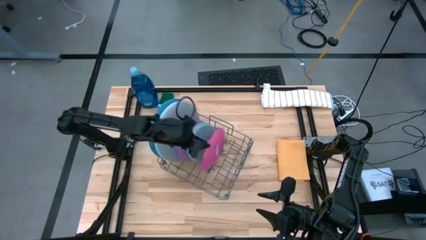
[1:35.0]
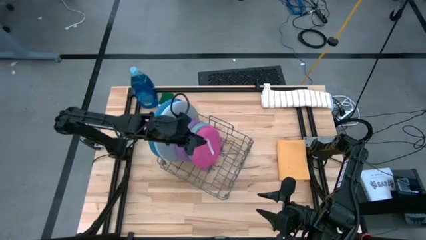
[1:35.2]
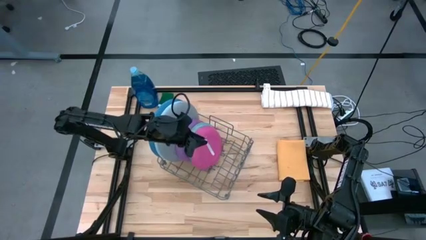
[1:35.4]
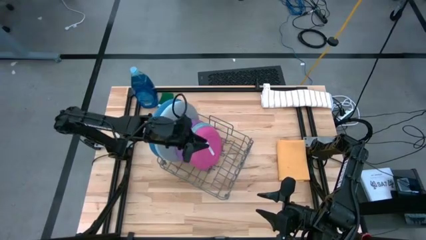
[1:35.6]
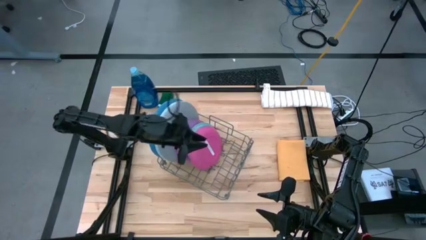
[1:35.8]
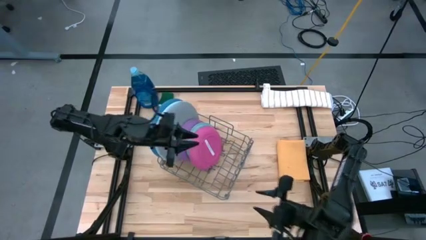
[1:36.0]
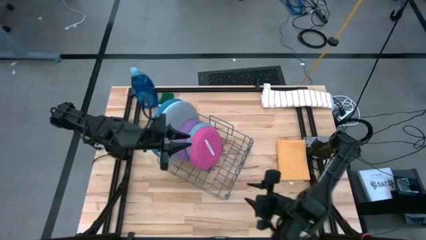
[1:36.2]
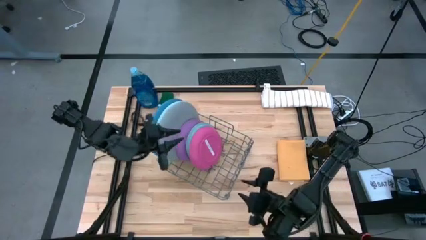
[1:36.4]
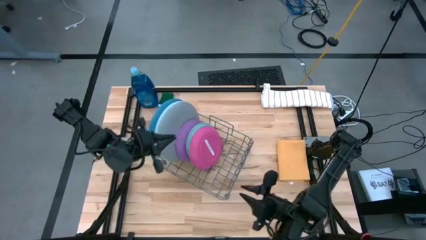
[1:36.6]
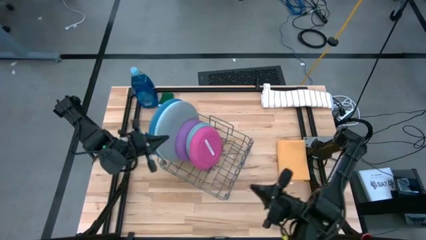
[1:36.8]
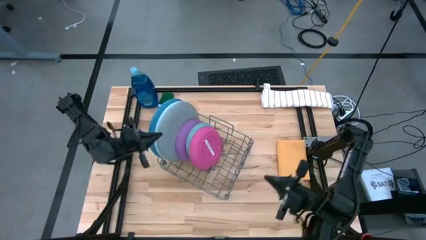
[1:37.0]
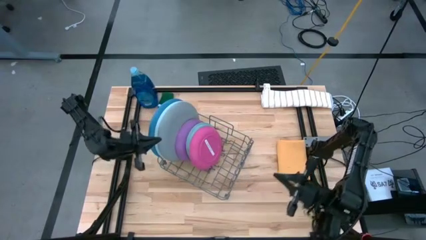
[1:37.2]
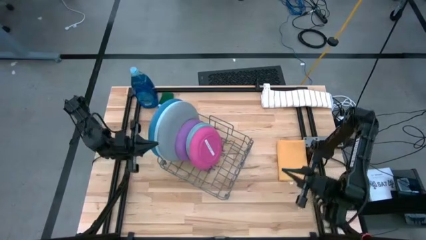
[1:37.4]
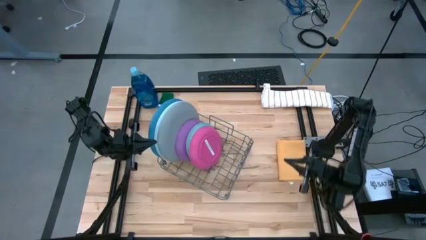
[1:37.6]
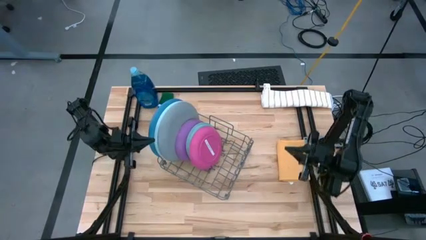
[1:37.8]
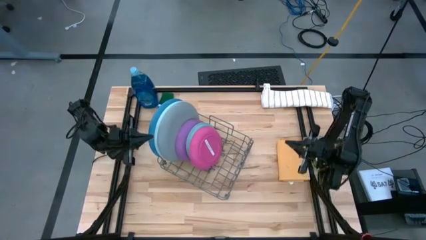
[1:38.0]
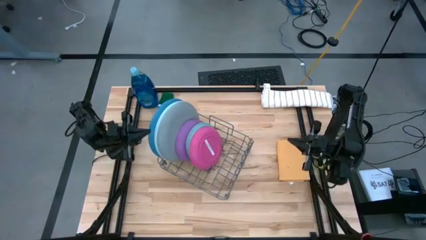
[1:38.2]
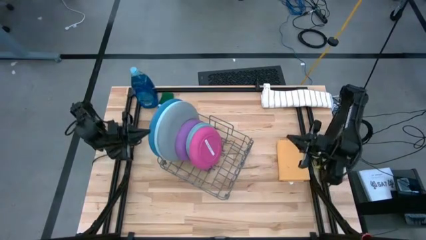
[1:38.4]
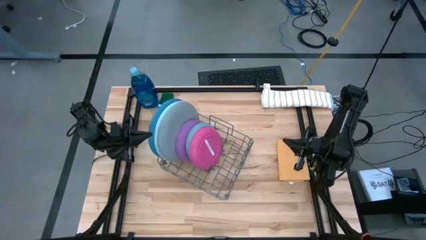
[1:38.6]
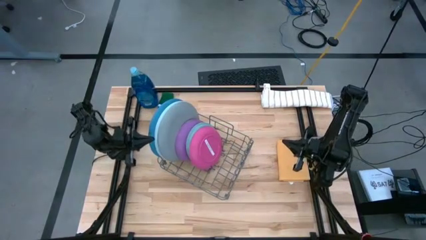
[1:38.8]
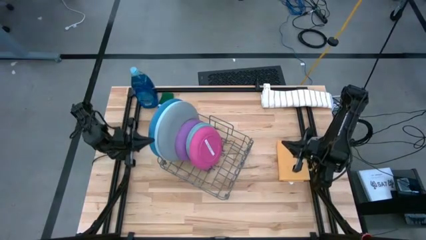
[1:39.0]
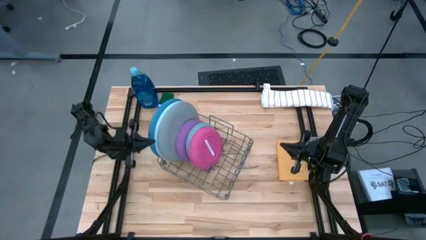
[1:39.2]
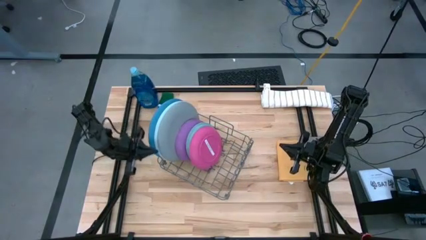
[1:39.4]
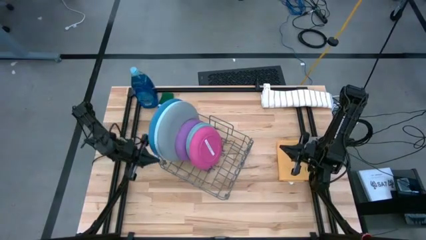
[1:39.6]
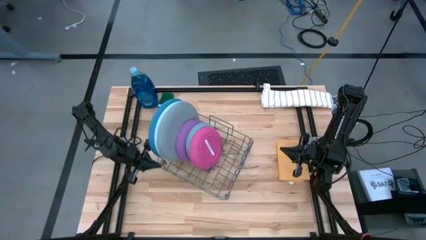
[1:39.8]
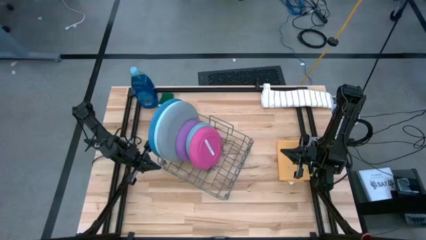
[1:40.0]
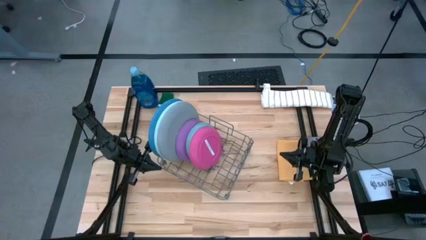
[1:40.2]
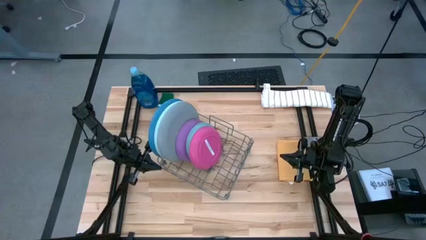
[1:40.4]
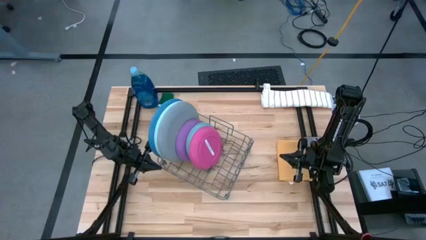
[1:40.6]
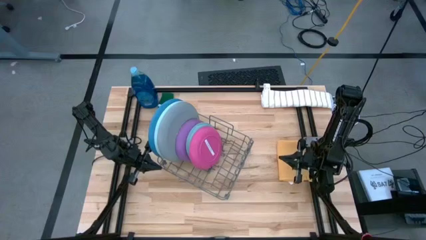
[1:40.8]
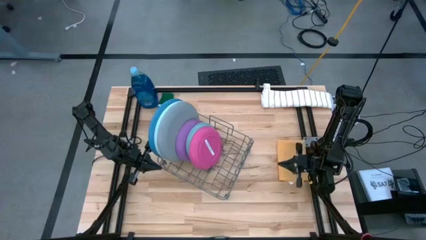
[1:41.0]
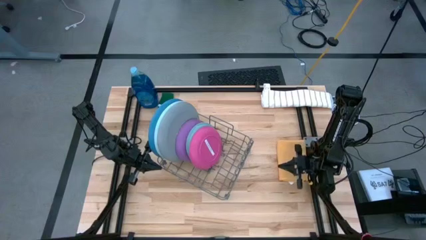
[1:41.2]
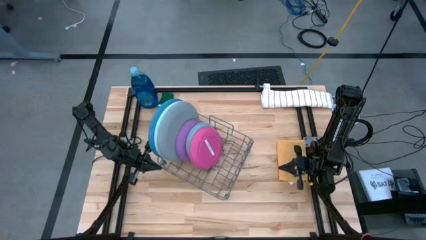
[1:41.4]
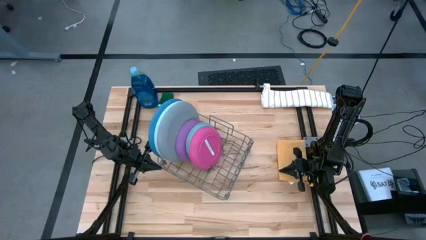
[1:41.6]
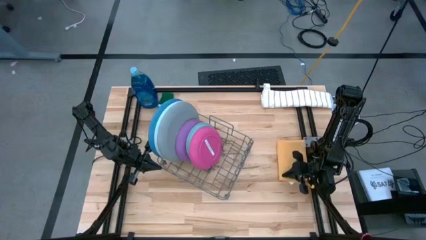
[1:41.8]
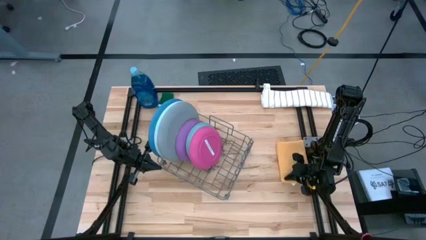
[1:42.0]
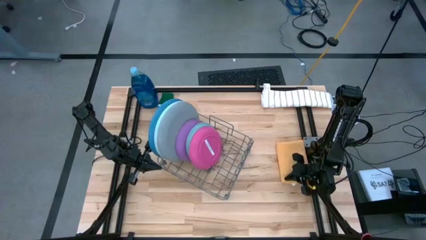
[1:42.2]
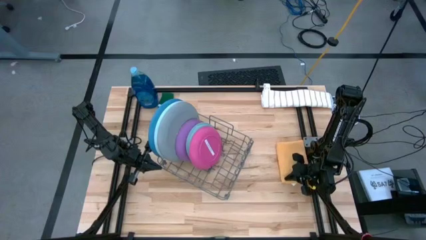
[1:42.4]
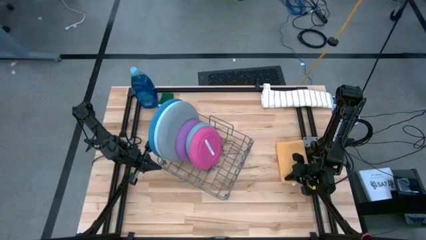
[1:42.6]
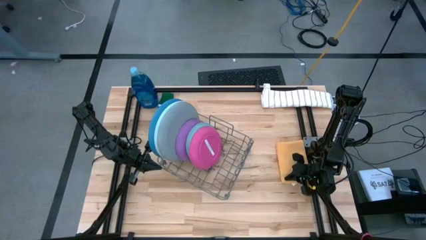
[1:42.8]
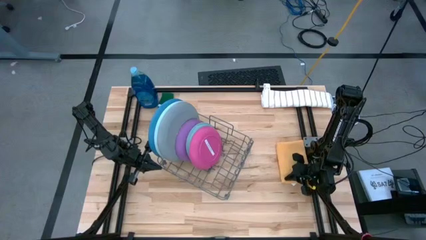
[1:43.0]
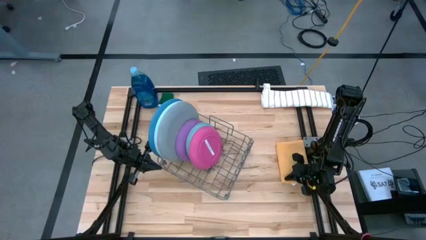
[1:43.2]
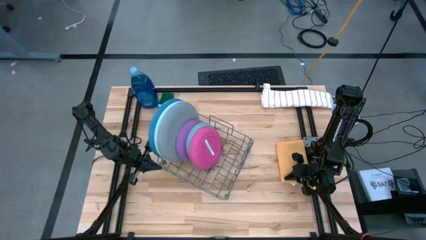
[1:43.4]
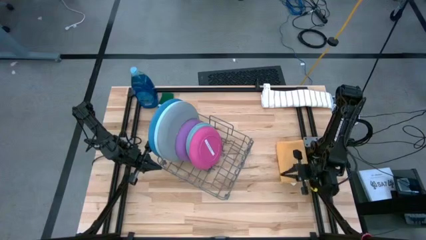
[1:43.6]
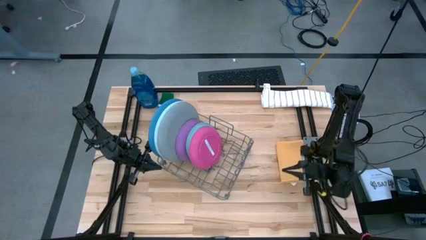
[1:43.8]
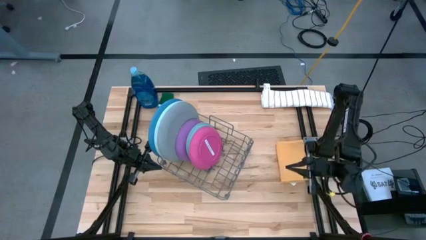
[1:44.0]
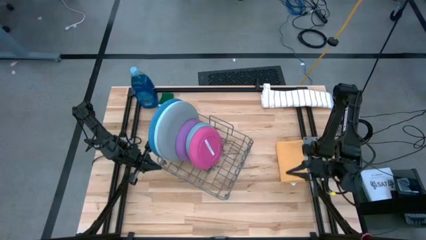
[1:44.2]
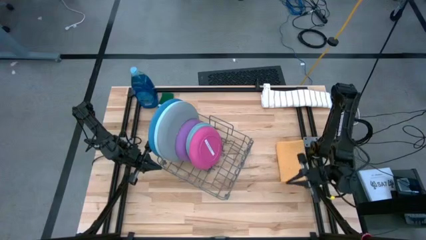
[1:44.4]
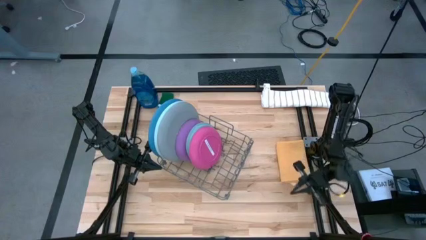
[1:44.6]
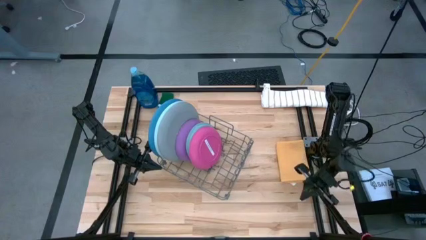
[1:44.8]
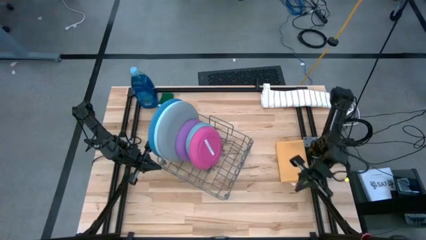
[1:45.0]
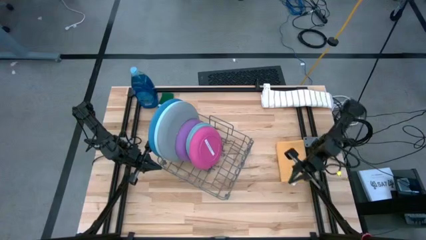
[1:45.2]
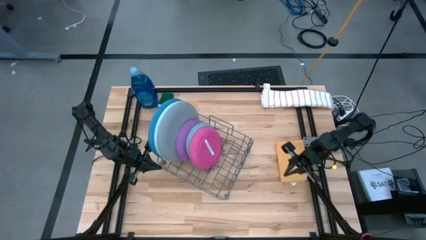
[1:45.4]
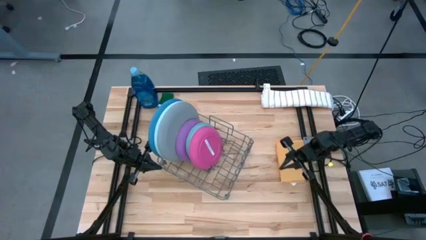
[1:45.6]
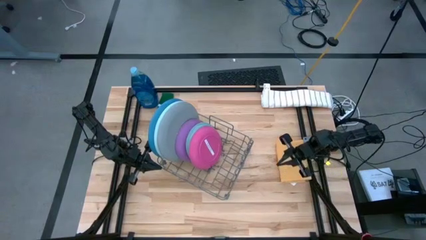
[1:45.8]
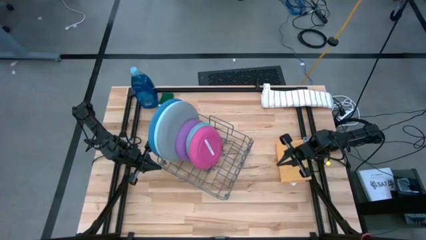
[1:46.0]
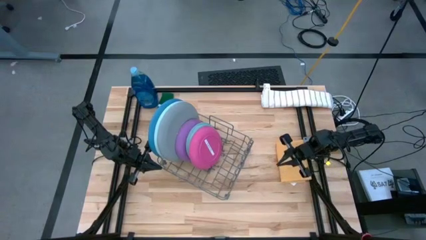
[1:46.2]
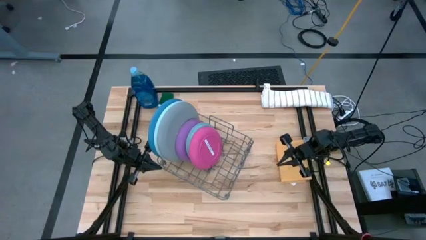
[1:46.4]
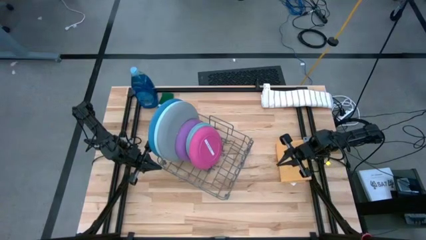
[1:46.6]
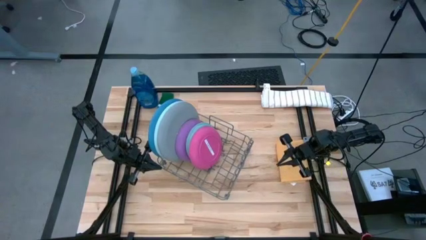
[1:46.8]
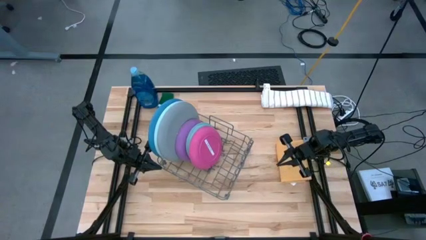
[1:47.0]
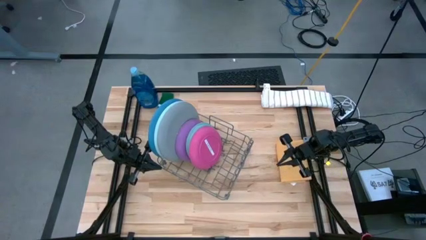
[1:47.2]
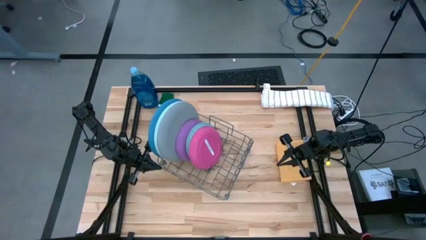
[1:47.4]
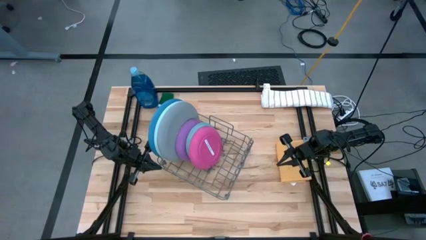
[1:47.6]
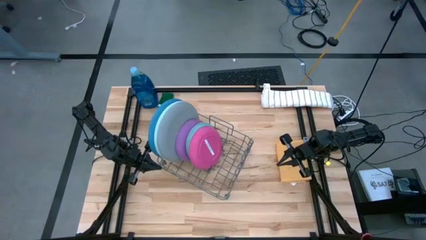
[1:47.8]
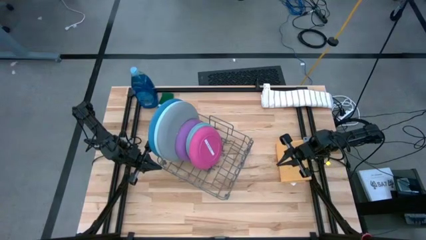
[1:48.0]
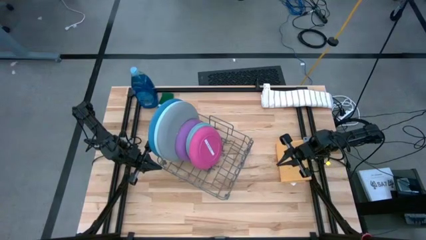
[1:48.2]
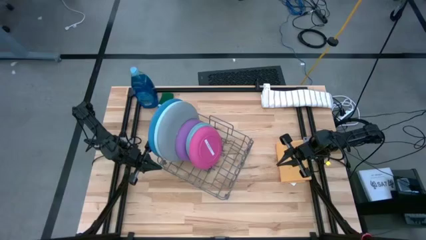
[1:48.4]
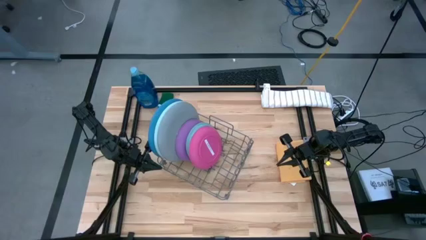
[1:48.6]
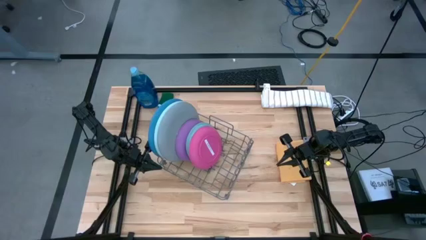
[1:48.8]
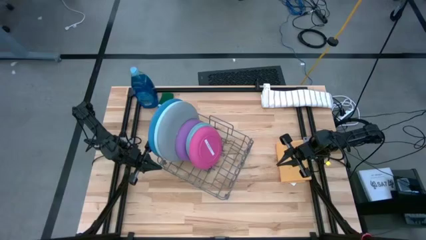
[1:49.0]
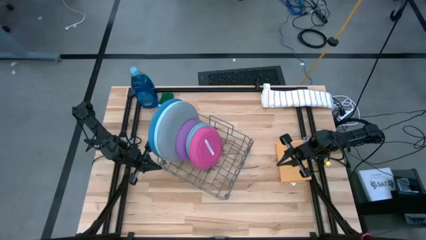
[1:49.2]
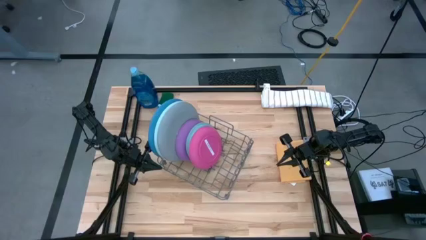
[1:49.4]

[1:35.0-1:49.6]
Task: Sort dishes
Return to Home Position
